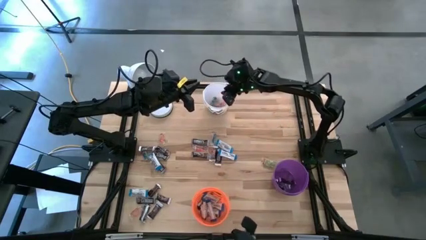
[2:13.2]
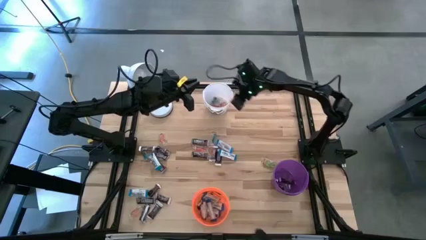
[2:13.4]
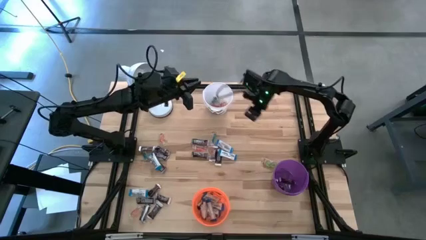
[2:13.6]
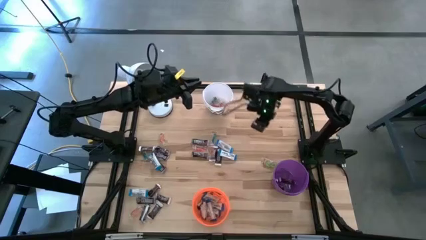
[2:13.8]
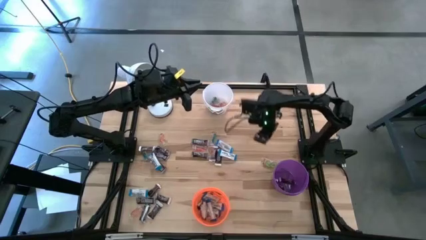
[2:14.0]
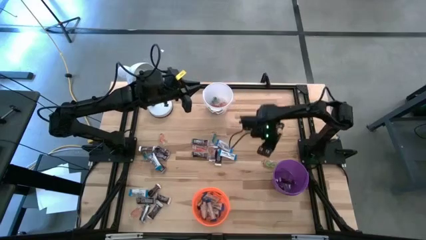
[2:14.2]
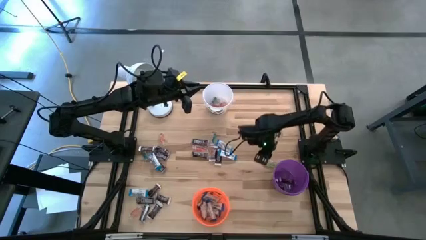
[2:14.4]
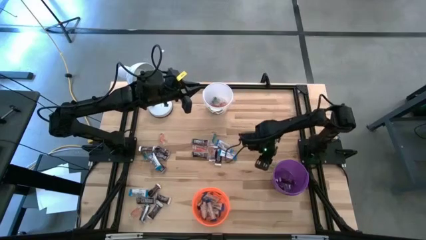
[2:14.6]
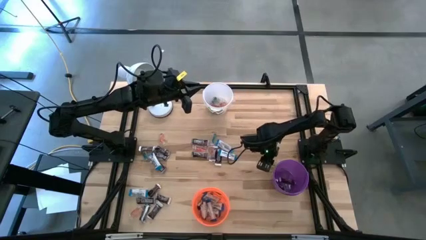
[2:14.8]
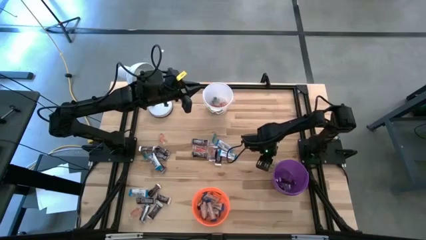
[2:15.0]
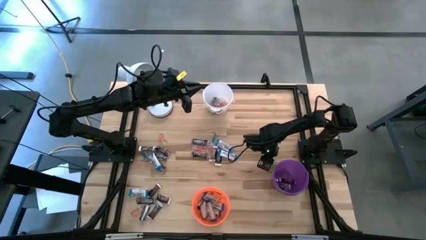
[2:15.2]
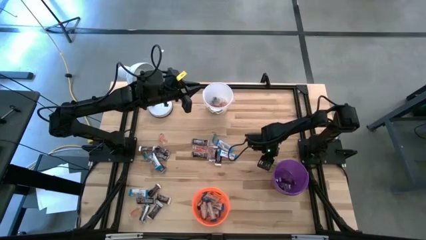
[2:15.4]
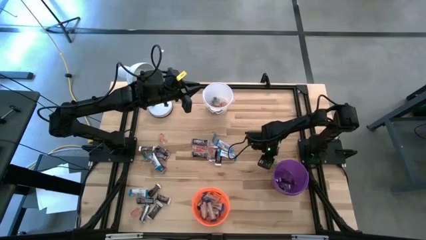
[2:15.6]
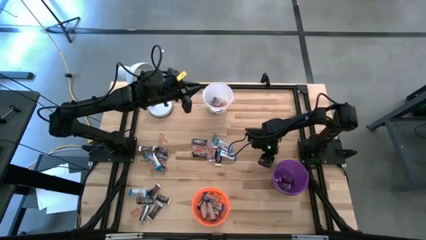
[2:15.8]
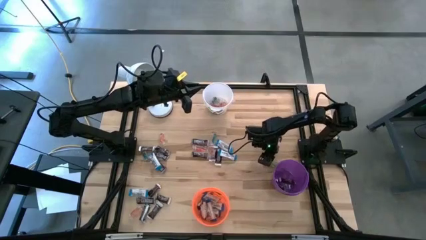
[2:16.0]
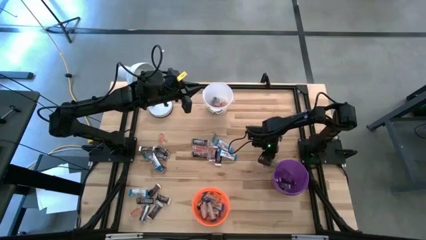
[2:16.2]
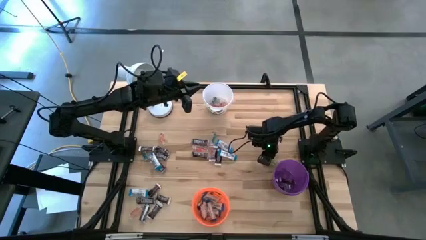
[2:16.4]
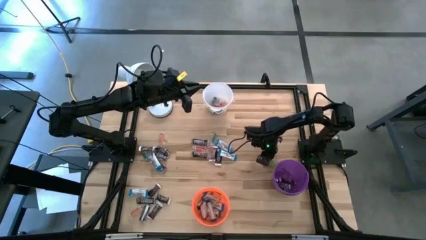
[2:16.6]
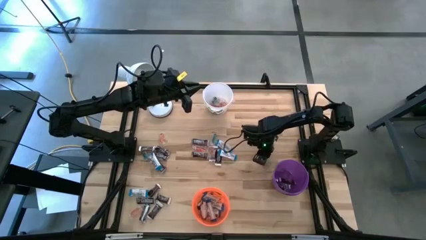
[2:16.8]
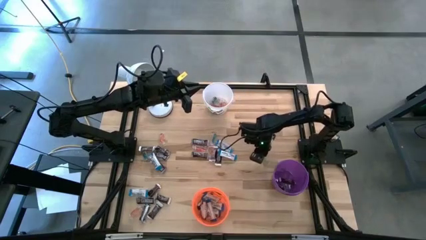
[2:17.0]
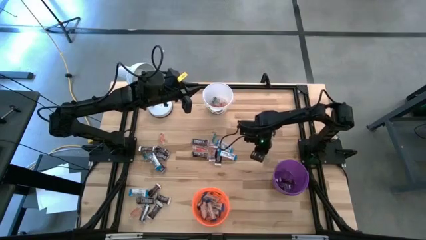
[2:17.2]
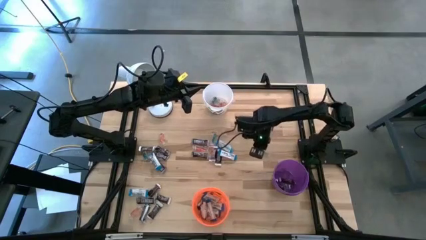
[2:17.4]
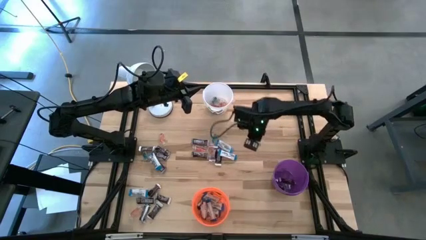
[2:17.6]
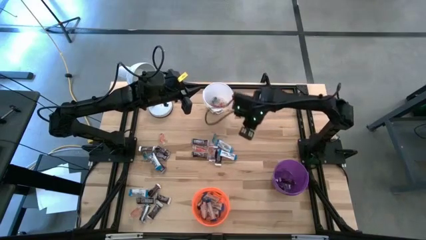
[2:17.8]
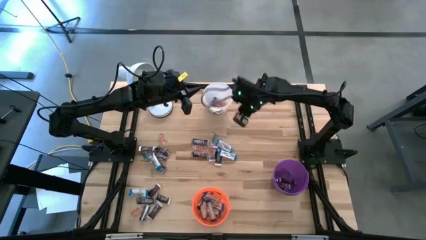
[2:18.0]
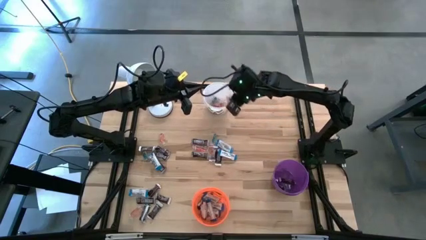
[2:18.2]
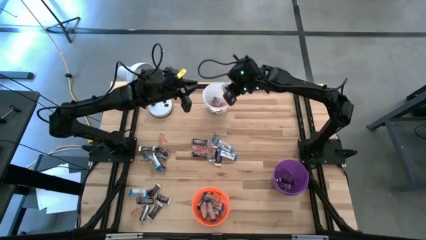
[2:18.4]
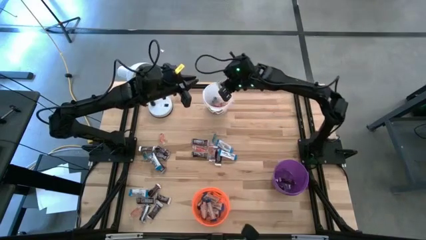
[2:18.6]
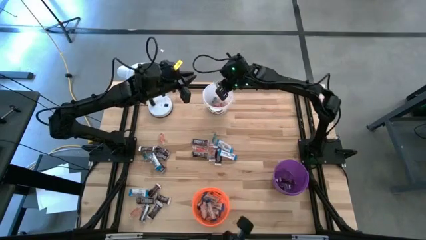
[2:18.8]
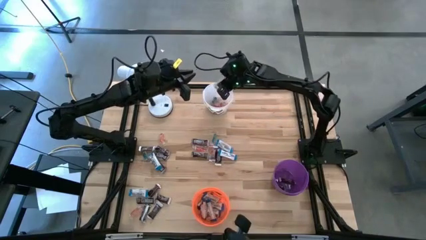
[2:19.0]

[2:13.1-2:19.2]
Task: Organize candy in baskets
Put the green gummy into the white bucket

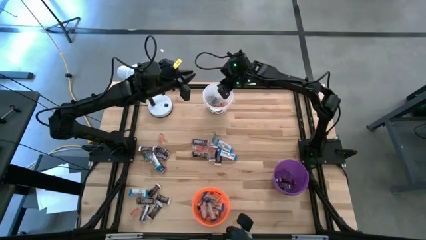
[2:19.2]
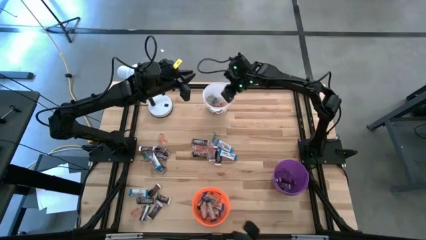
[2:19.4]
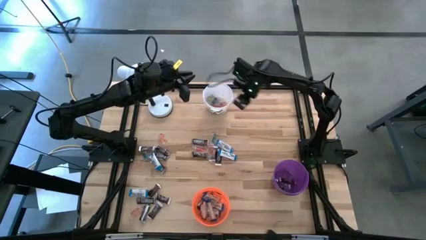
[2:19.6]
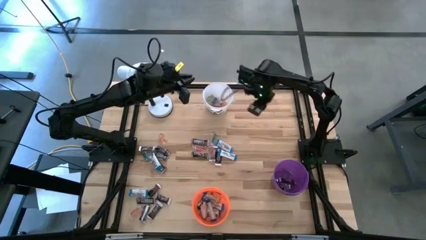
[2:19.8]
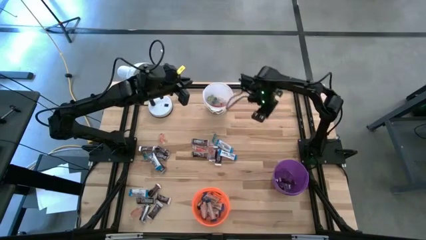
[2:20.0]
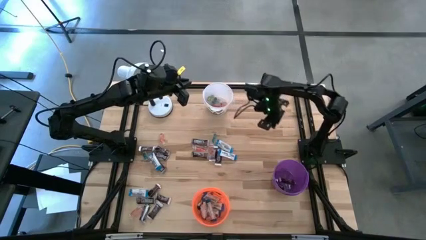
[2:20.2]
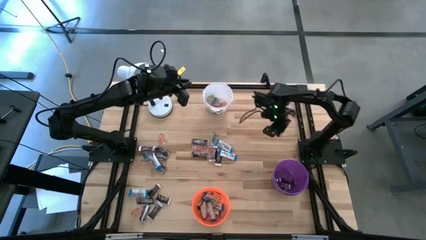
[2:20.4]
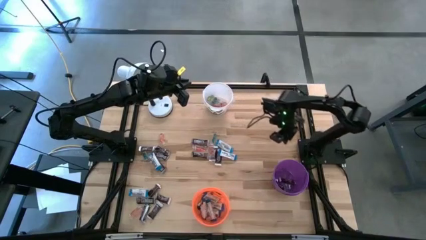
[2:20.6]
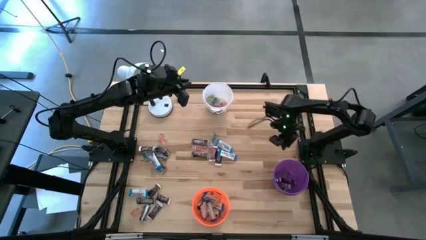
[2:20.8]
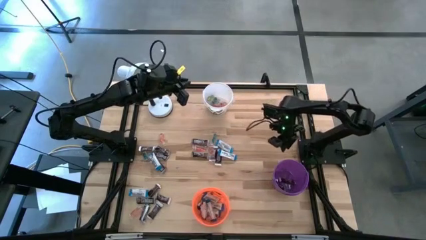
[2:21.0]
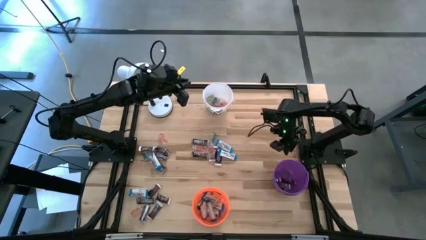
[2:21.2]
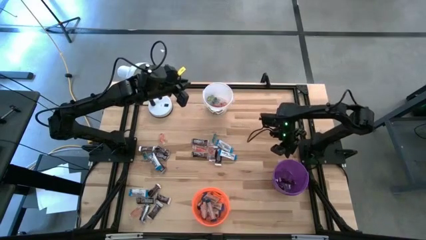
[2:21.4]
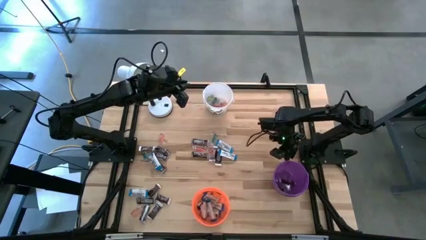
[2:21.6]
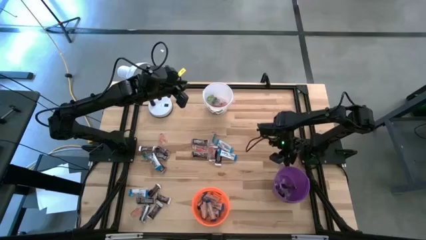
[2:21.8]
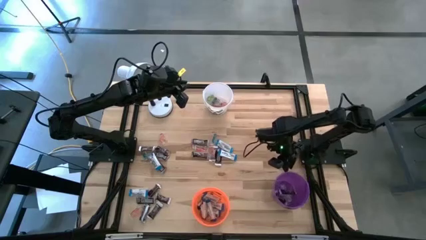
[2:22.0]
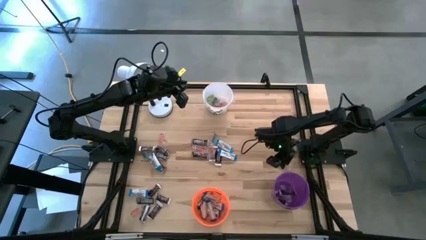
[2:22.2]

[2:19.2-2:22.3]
Adjust the dark purple bucket on the table

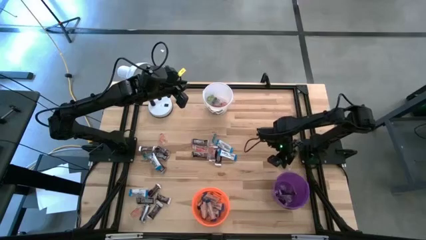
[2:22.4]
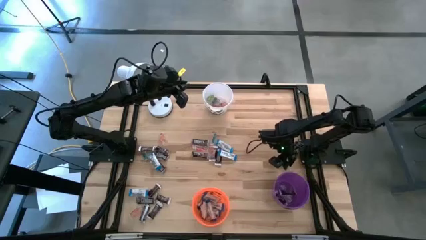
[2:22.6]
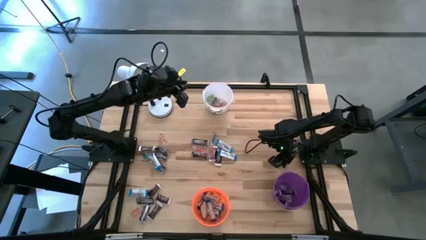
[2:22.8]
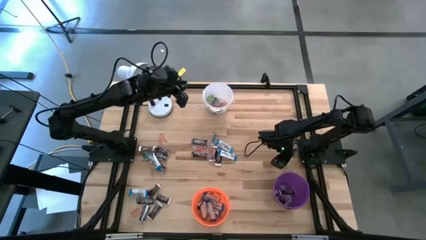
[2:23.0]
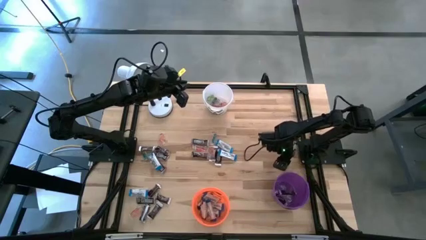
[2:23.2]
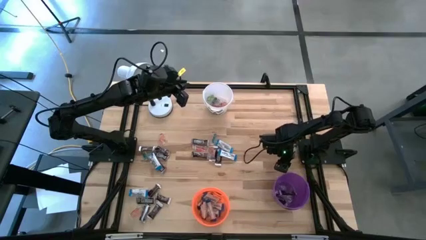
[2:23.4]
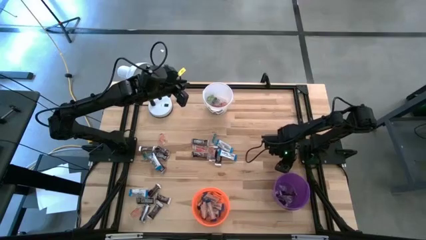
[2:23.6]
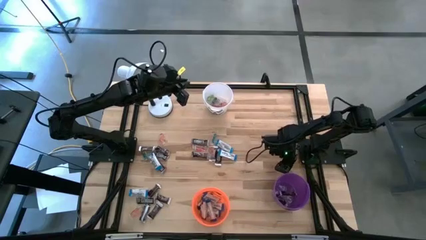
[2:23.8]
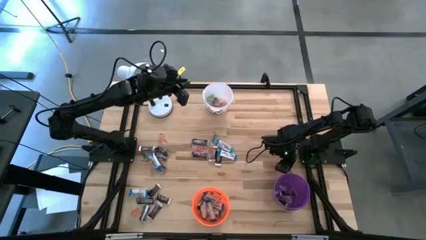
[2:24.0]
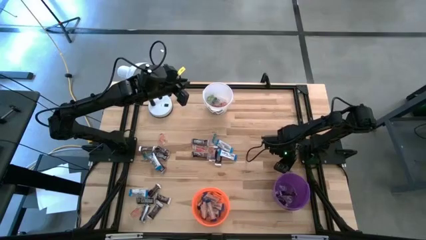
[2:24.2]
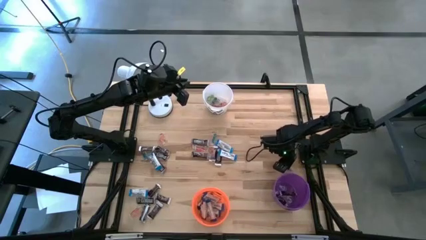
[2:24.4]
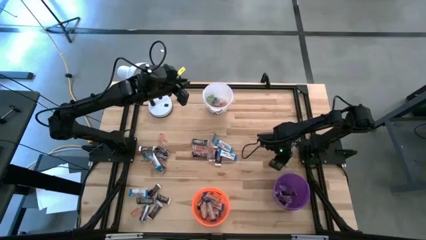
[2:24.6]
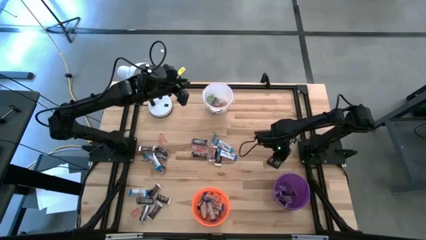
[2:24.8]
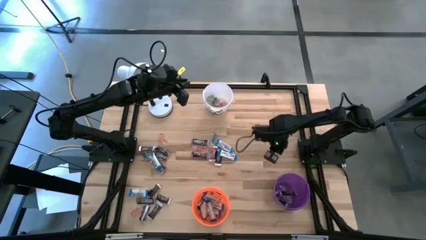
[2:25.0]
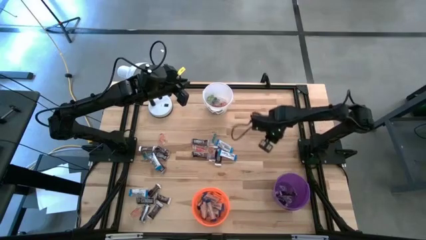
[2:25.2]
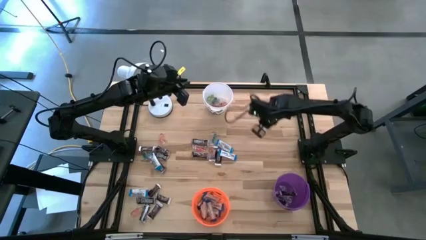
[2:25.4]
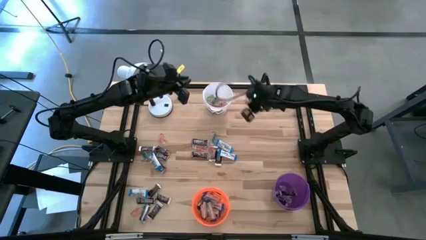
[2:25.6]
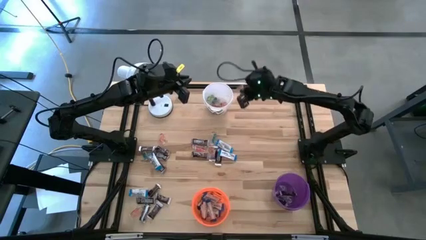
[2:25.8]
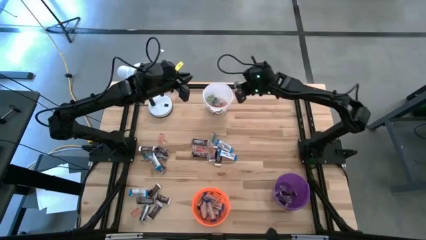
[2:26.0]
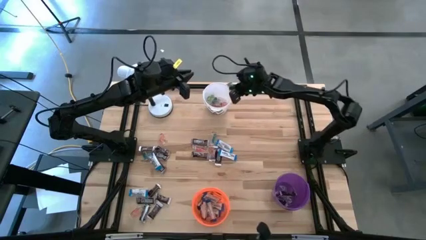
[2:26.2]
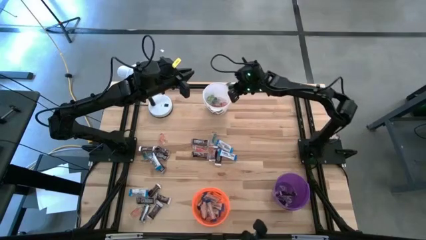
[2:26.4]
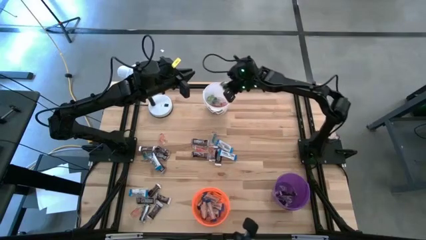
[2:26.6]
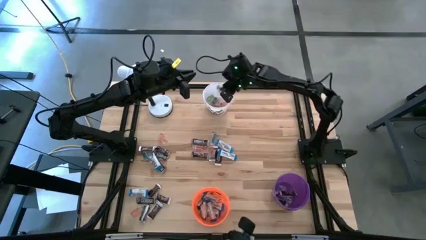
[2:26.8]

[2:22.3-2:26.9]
Put the green gummy into the white bucket
